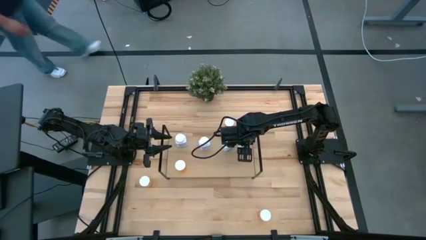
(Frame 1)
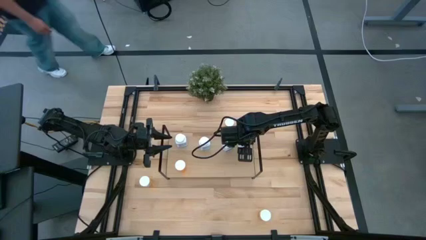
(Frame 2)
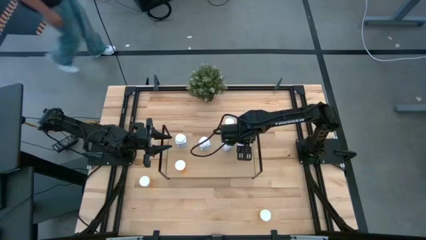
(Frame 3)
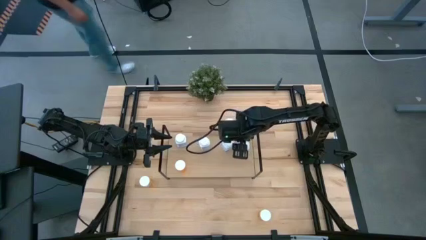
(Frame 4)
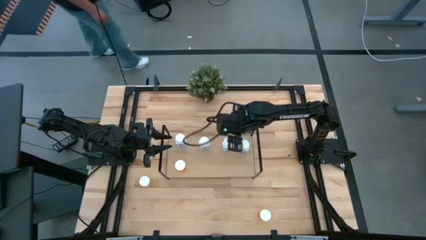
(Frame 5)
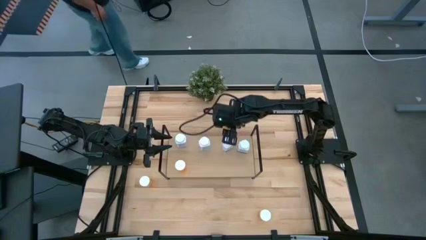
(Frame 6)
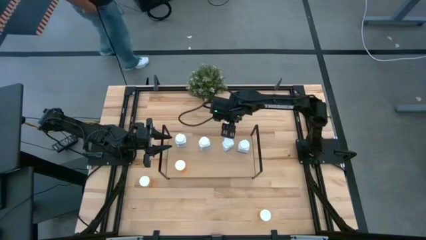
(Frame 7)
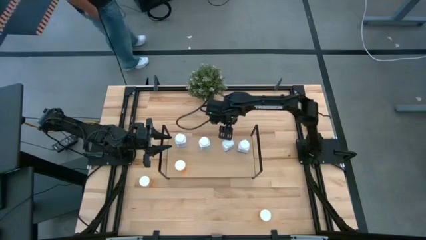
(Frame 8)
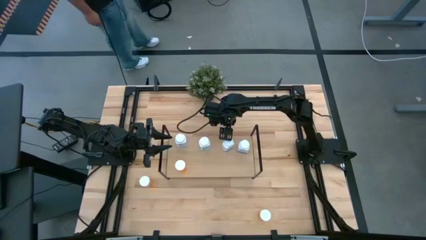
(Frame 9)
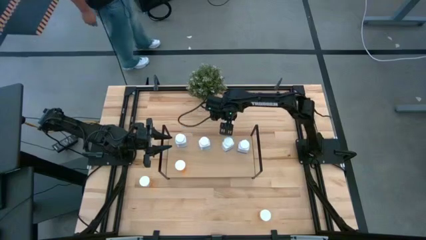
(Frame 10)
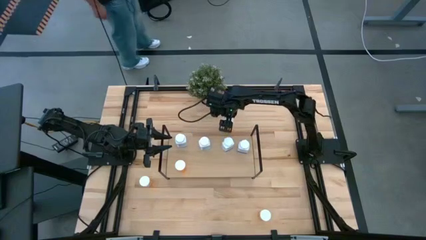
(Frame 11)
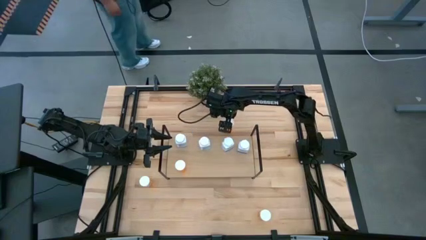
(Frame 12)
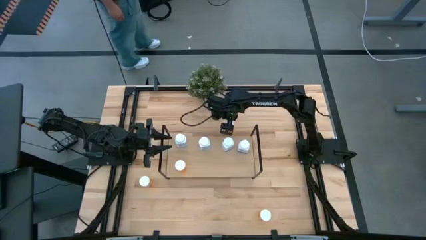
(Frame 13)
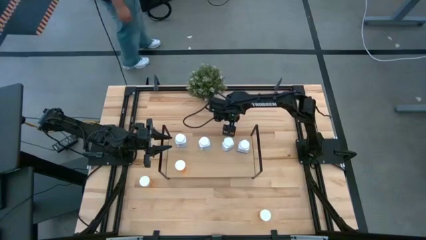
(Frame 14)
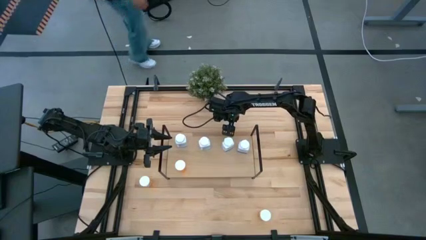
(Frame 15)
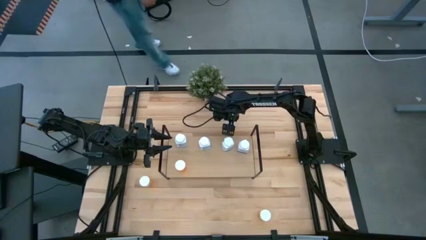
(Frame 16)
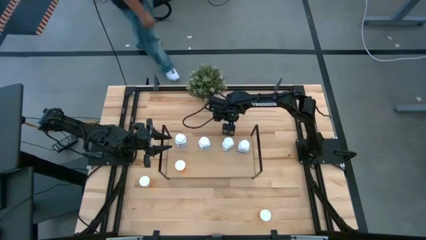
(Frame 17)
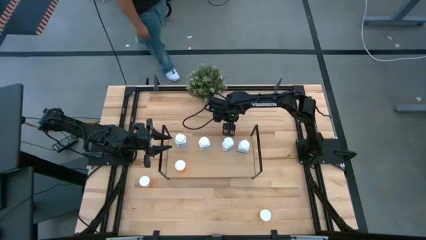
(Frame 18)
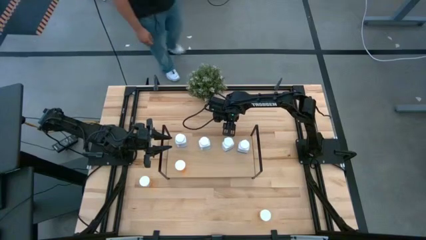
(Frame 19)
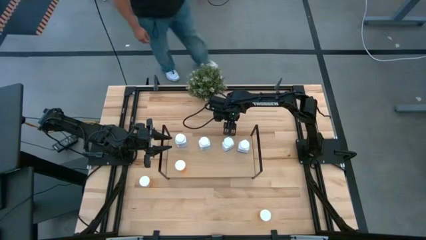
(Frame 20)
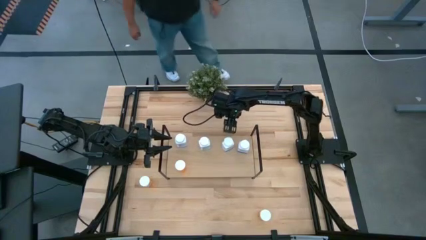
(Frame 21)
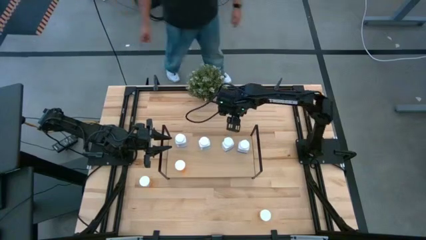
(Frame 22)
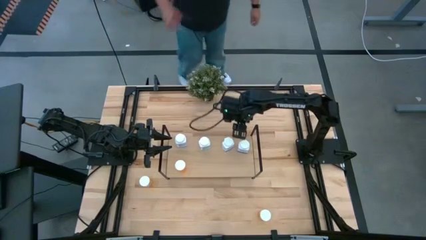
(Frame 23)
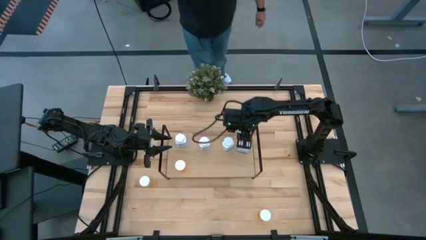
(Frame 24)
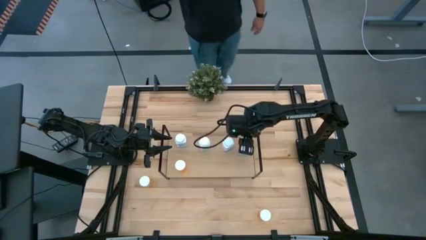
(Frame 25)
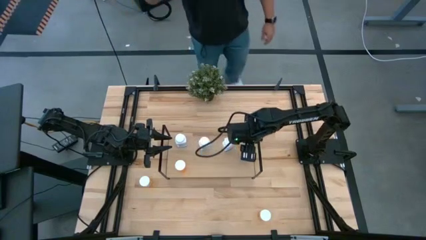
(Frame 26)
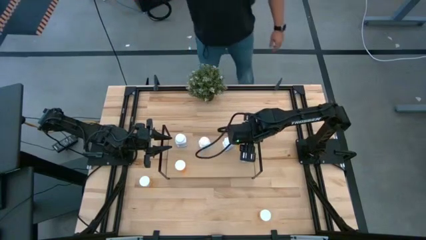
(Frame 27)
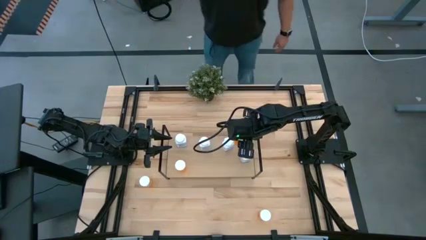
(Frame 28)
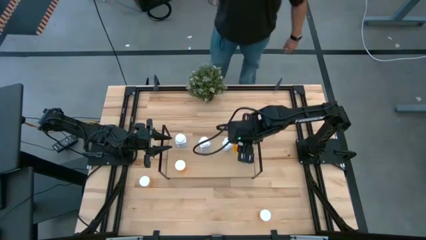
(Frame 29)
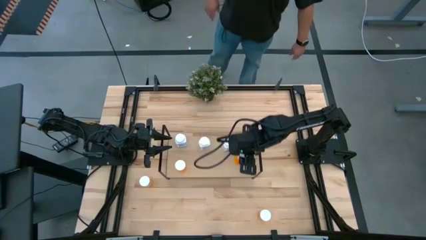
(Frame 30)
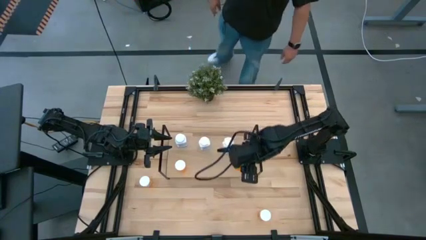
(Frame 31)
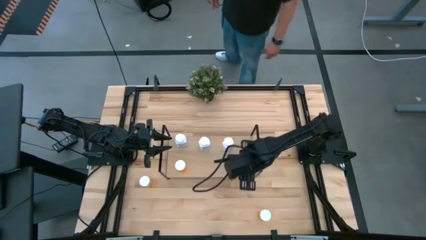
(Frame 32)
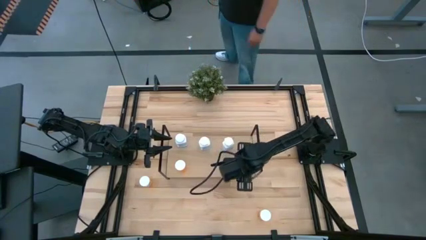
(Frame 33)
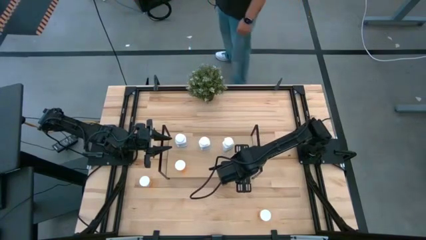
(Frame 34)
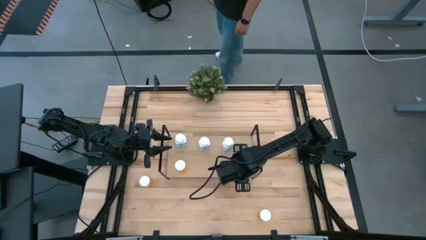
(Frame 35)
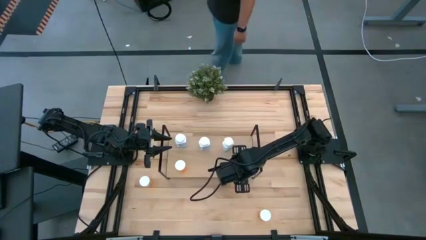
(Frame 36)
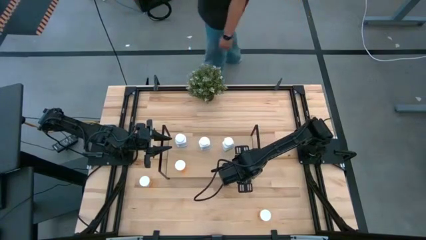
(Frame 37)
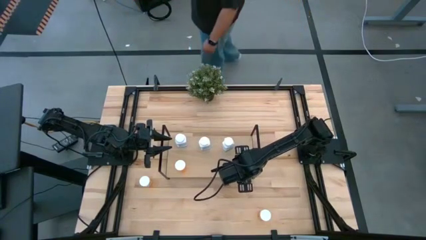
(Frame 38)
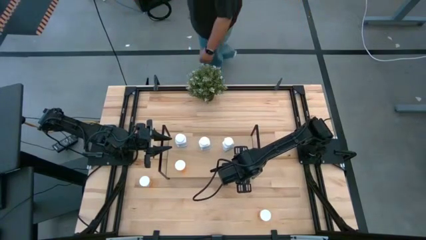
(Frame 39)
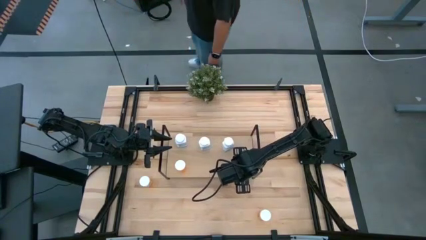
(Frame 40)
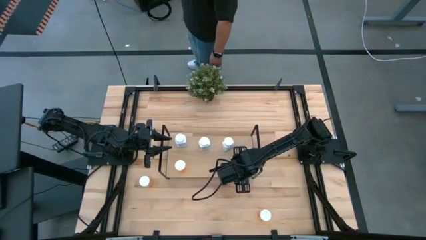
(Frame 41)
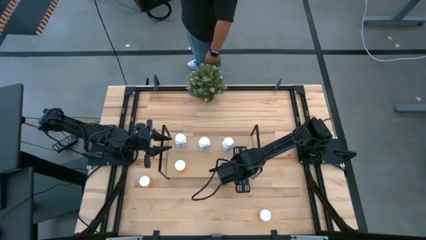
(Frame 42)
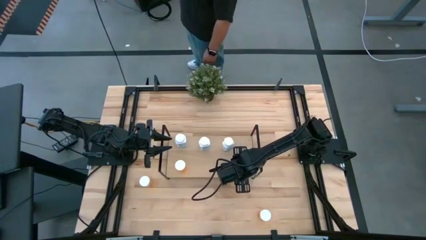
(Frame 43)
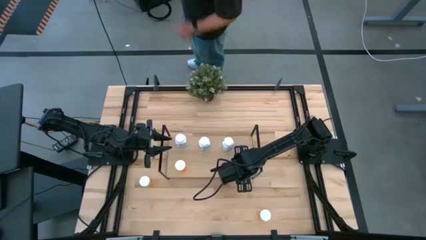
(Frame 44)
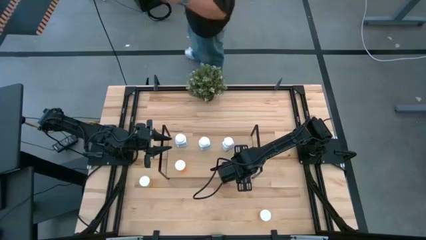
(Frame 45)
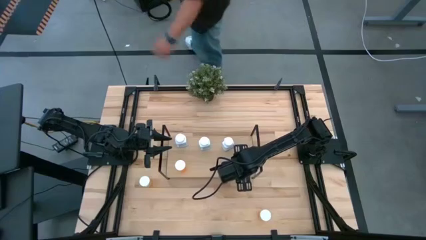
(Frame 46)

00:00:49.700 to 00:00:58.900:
Task: Pick and place medicine bottles onto shelf by color
Put the top orange pill bottle on the shelf

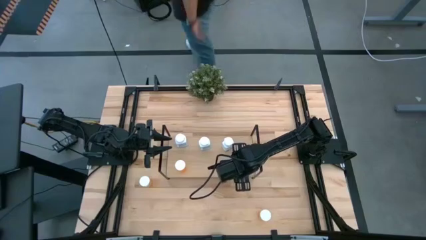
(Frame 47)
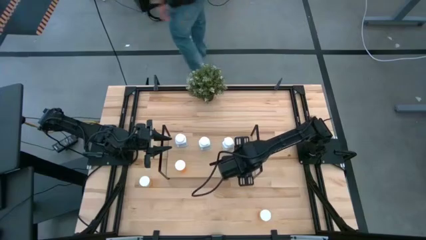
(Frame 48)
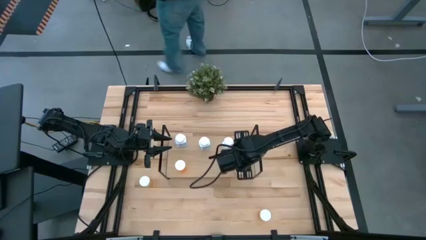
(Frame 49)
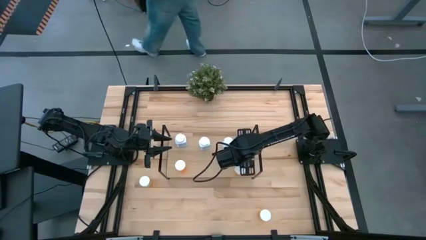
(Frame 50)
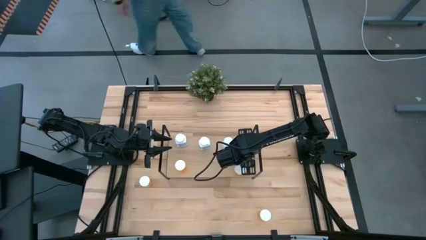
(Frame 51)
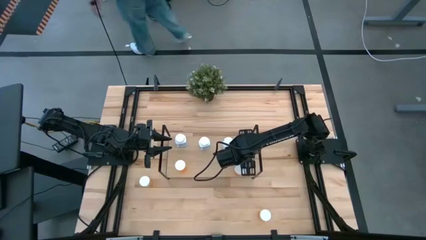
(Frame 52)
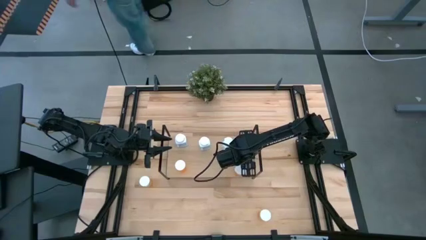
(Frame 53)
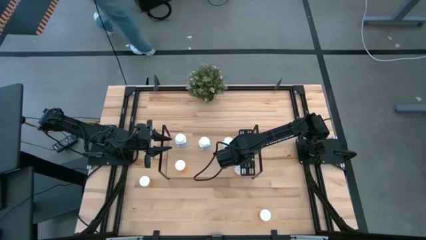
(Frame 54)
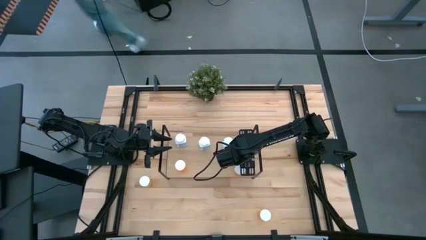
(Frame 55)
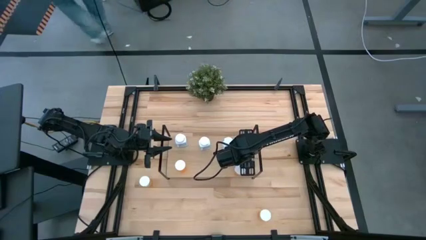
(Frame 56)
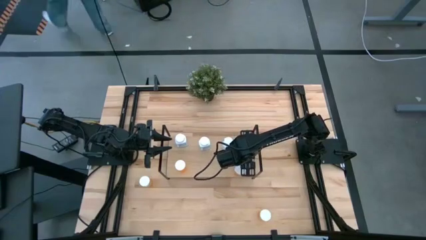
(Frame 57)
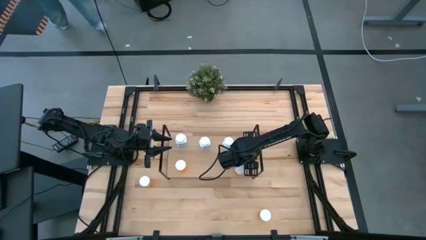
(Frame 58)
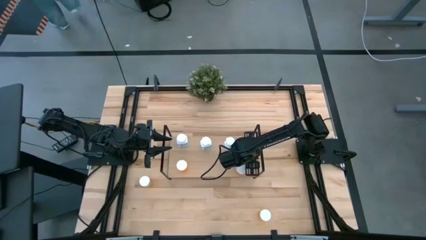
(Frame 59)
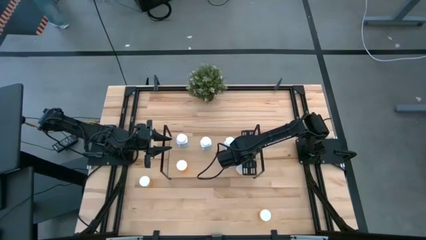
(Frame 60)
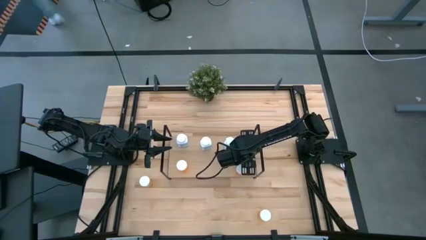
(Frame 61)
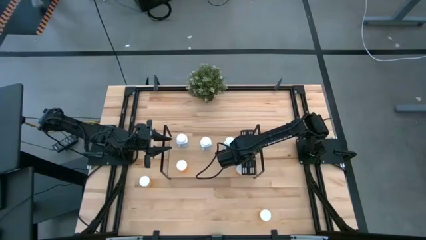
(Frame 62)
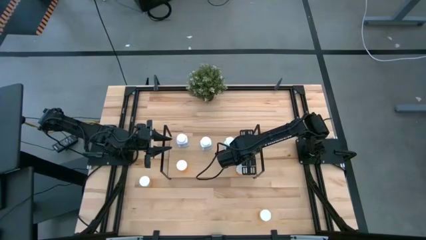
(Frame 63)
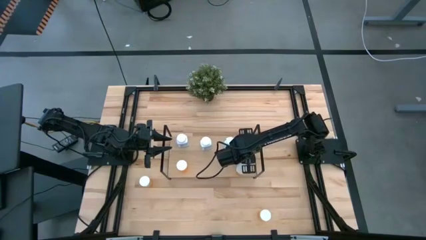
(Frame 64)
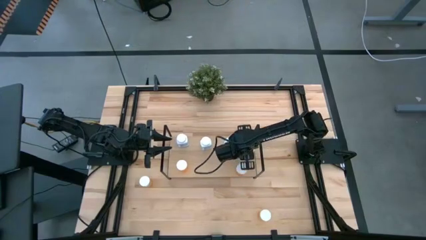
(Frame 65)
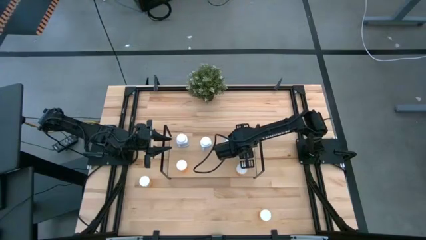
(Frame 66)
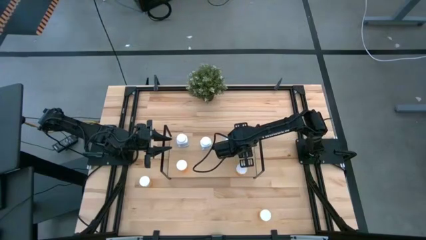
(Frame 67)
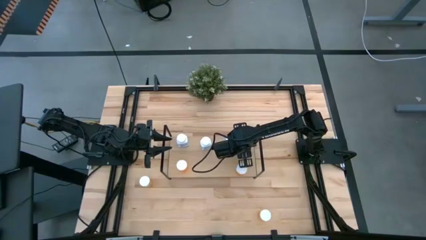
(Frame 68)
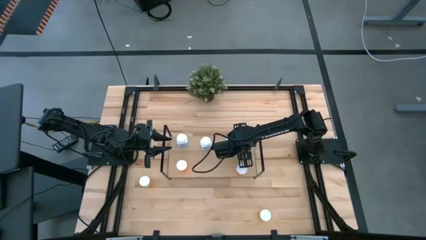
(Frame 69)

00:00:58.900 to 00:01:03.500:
Adjust the white pill bottle on the shelf
